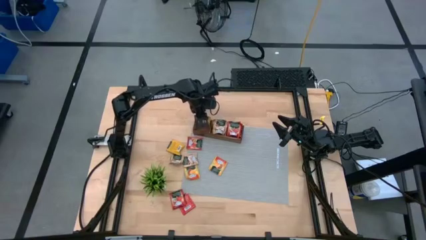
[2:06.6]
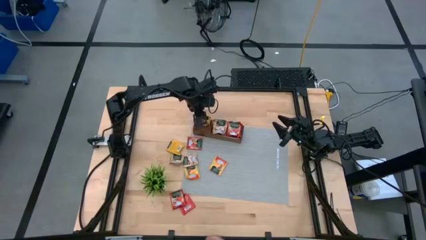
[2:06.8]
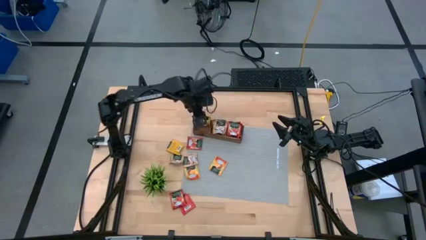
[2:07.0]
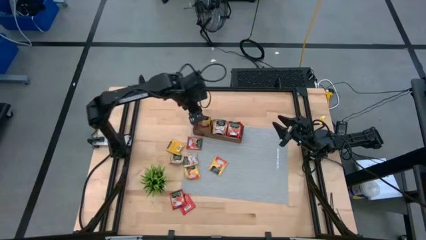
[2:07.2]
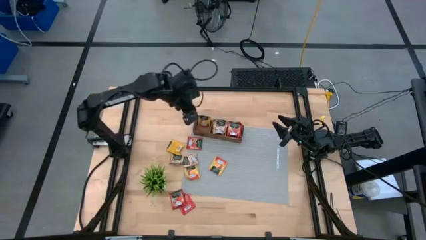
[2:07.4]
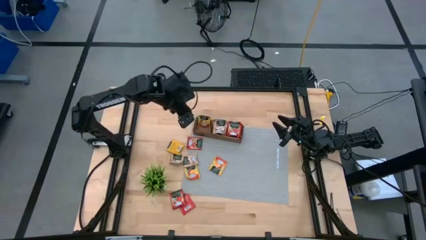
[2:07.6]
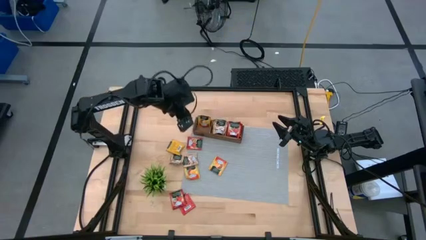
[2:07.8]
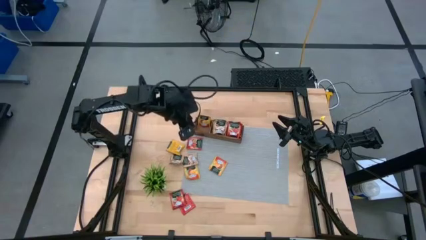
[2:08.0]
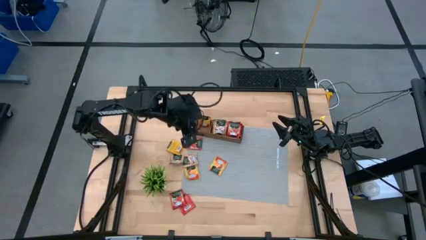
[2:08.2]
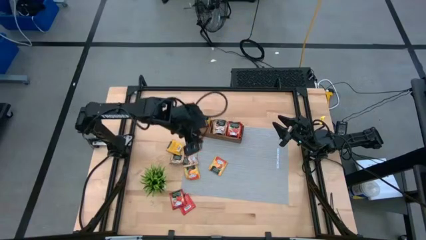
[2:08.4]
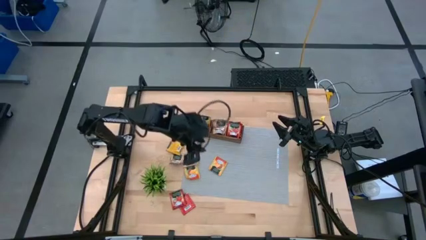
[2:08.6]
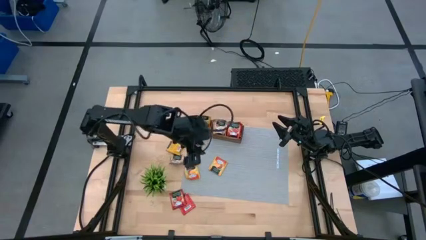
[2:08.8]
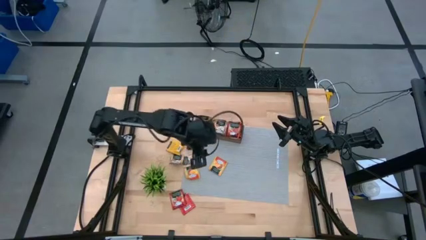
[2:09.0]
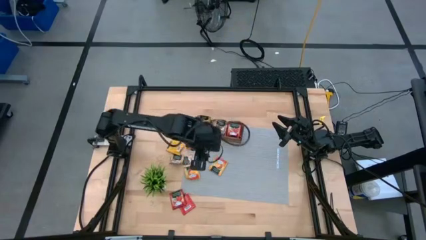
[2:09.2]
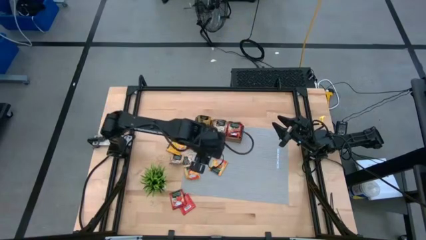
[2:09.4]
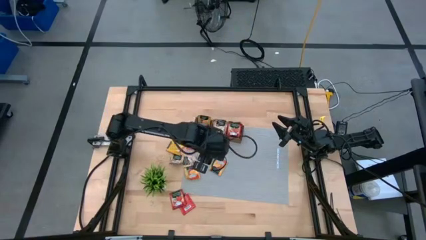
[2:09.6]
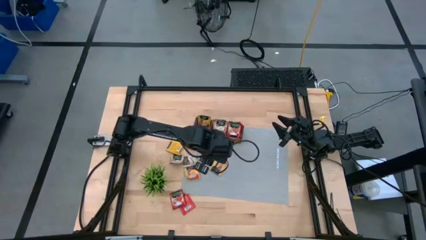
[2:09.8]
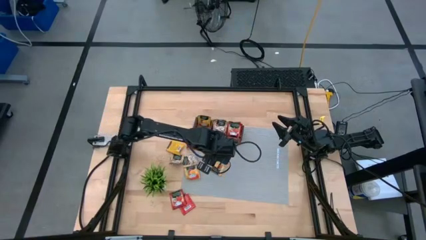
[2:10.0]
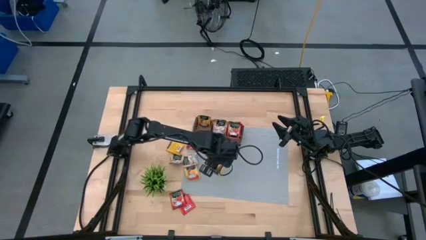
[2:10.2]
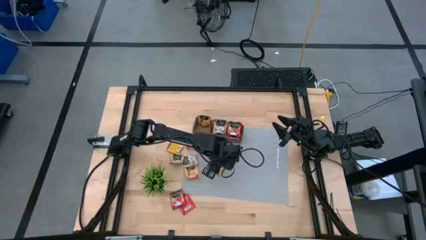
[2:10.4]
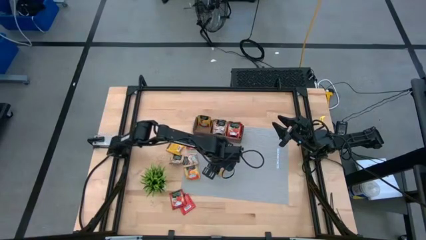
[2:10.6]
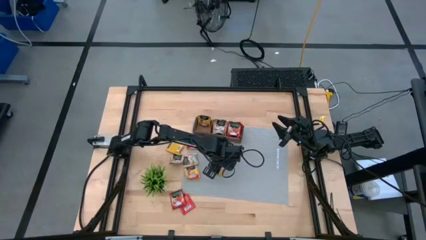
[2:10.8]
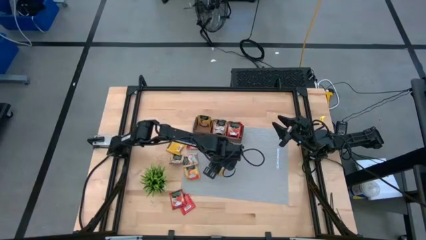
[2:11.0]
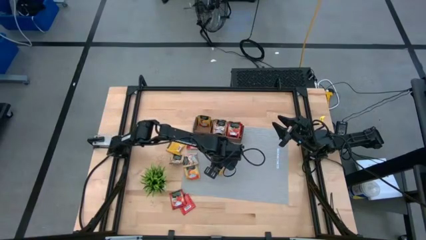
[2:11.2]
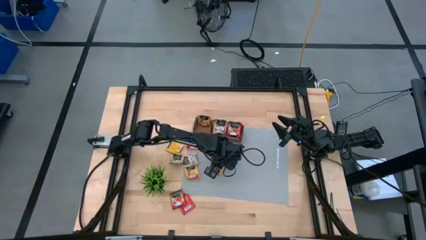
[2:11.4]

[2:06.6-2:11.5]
Task: Pick & Place Tea
Put the yellow tea bag into the left section of the wooden organizer

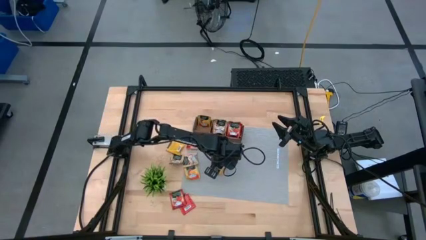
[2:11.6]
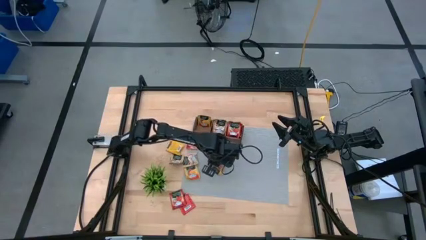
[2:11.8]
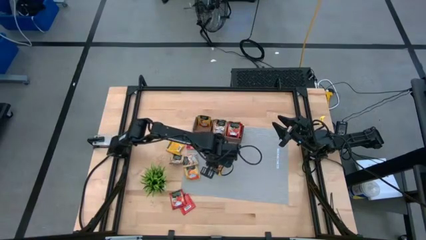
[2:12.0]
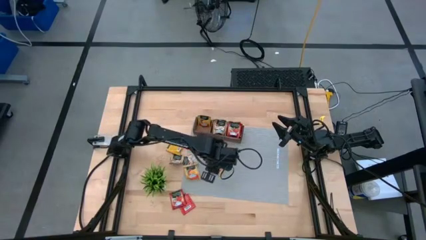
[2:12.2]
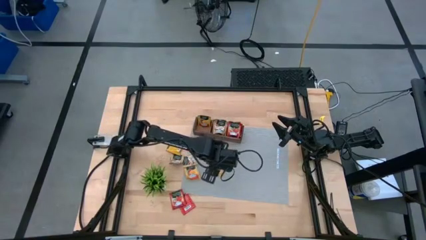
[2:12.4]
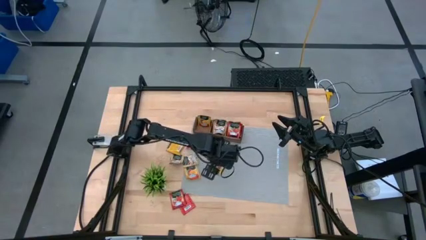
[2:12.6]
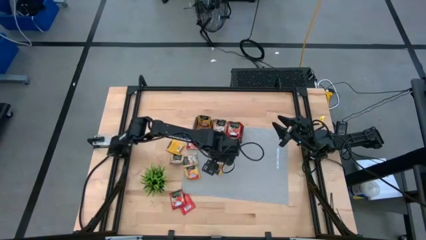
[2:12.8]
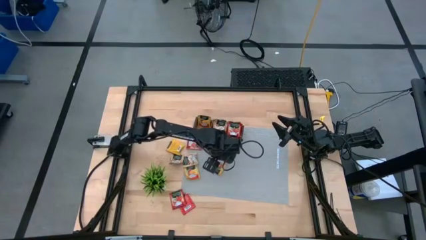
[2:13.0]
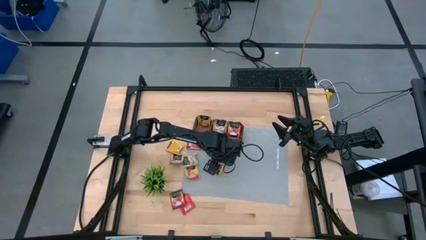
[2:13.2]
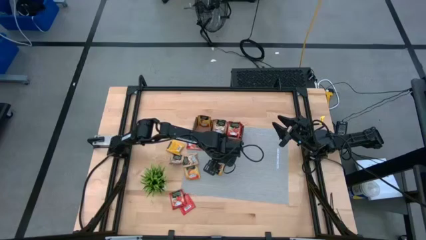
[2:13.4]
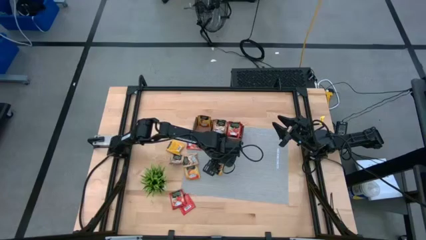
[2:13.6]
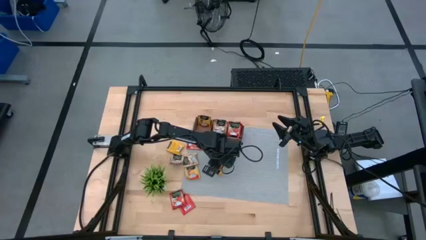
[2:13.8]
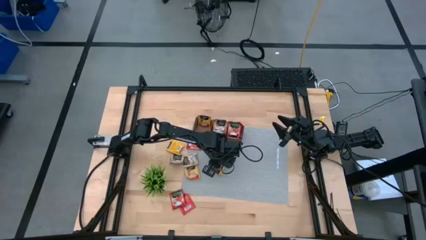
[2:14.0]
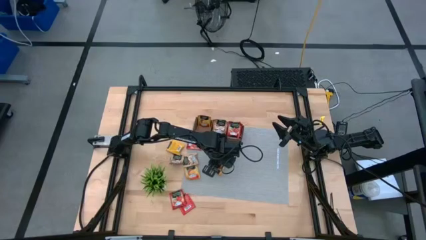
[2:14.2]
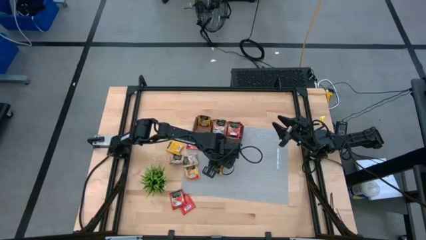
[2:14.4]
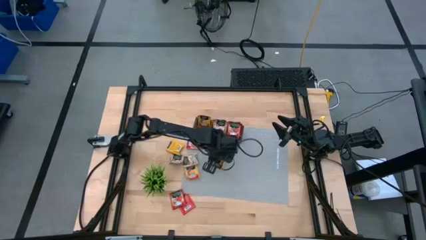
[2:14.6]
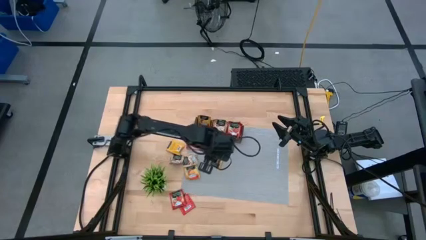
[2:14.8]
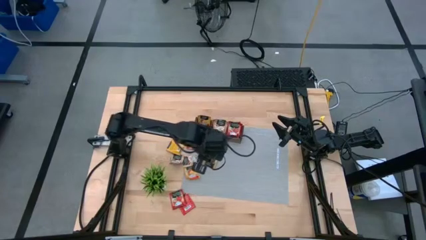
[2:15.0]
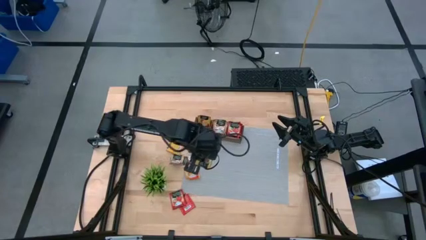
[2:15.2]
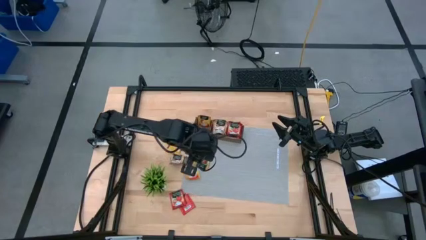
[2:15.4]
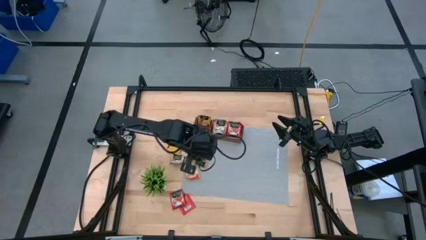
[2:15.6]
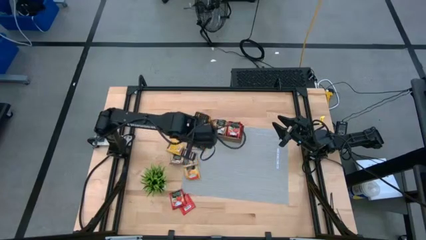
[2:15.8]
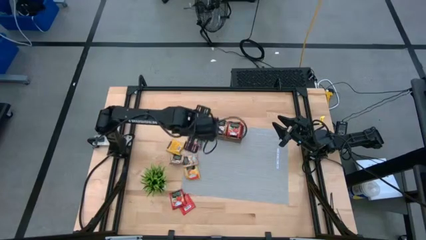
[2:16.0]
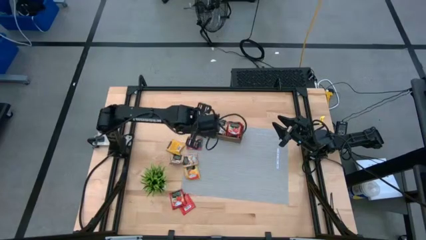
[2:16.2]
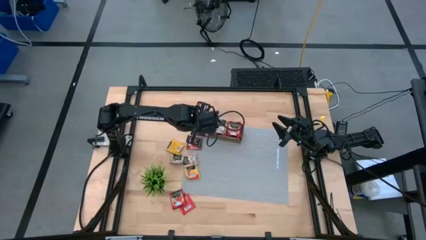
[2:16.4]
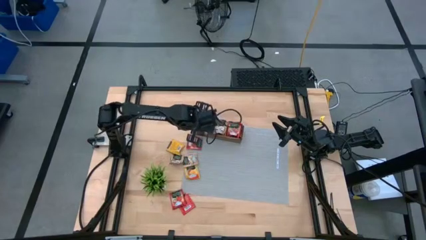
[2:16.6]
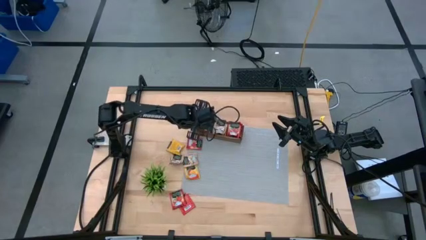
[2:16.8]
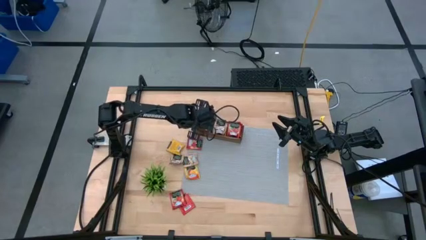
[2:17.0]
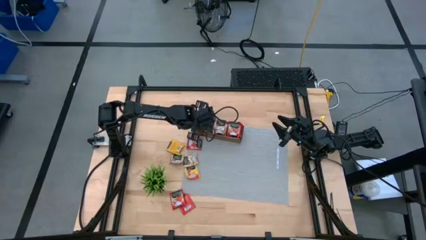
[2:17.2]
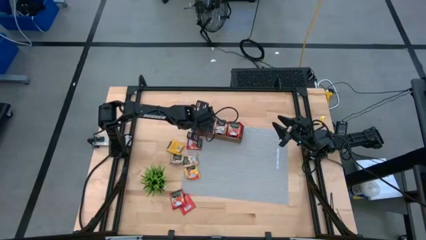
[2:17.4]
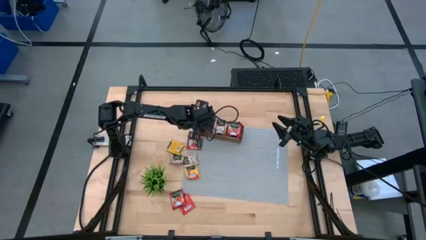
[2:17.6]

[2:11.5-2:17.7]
Put the yellow tea bag into the left section of the wooden organizer
